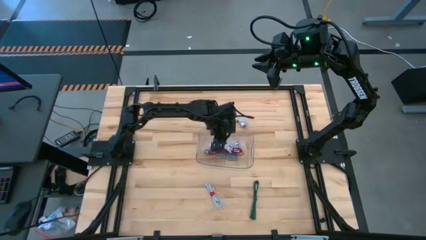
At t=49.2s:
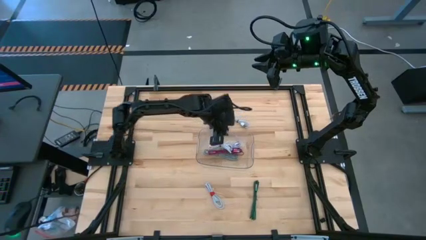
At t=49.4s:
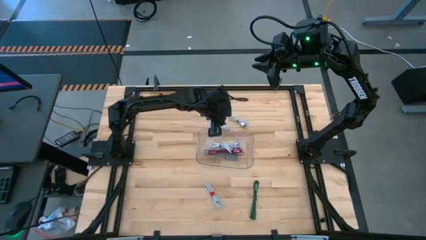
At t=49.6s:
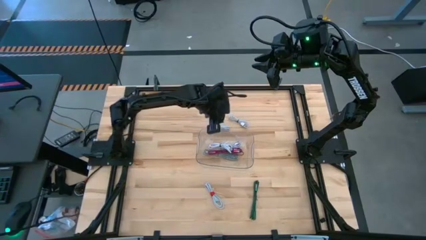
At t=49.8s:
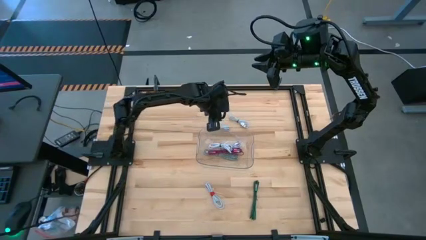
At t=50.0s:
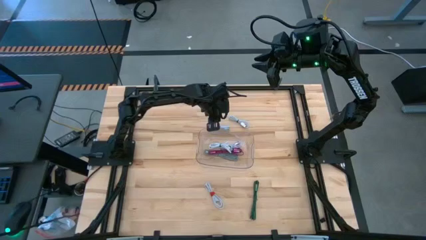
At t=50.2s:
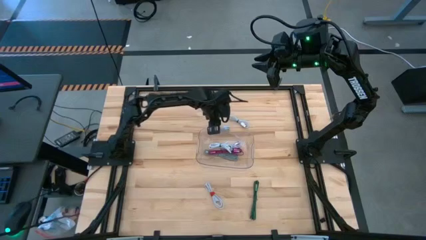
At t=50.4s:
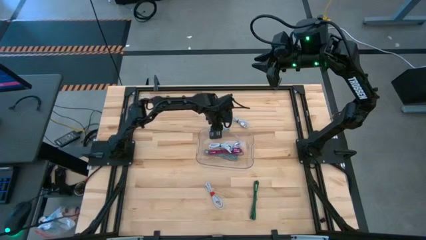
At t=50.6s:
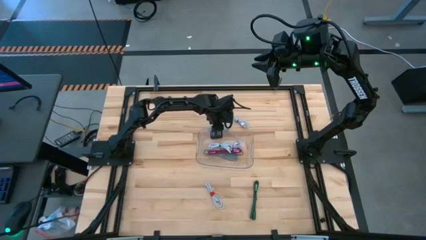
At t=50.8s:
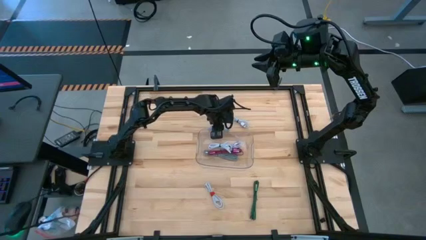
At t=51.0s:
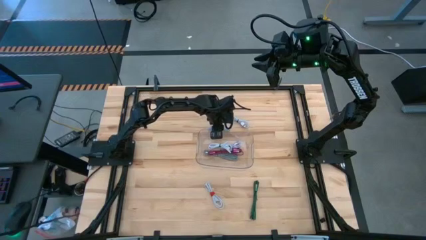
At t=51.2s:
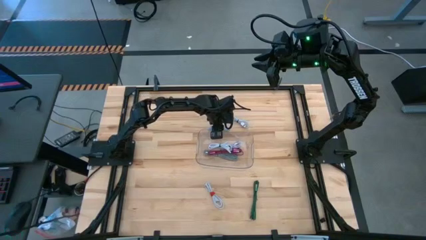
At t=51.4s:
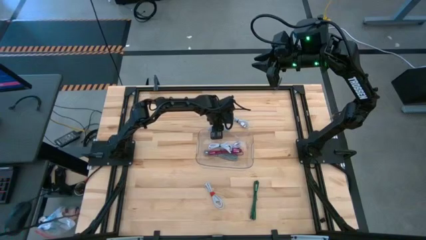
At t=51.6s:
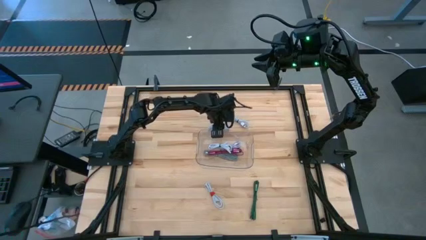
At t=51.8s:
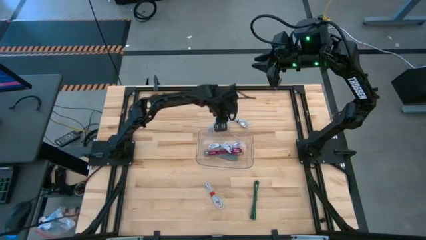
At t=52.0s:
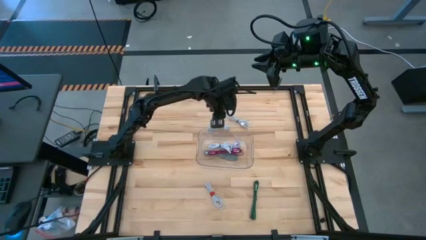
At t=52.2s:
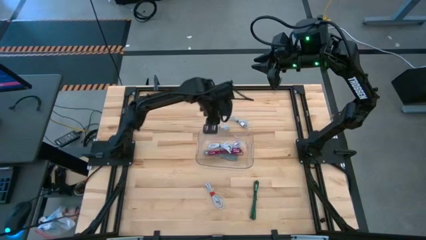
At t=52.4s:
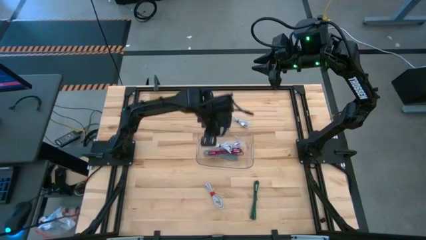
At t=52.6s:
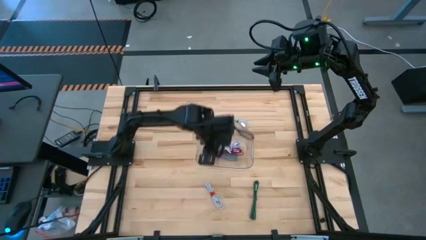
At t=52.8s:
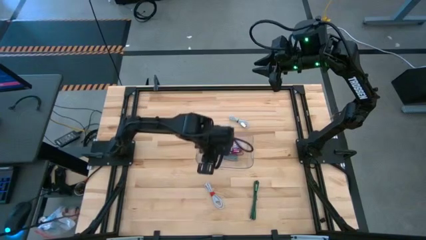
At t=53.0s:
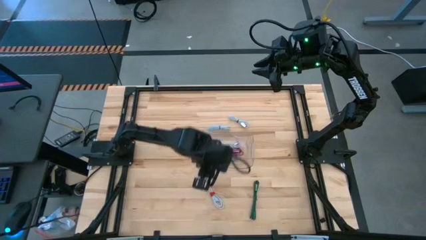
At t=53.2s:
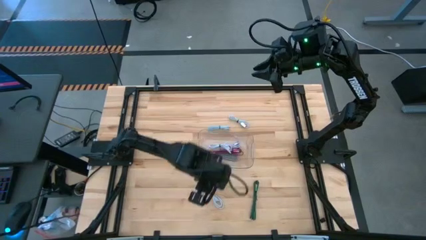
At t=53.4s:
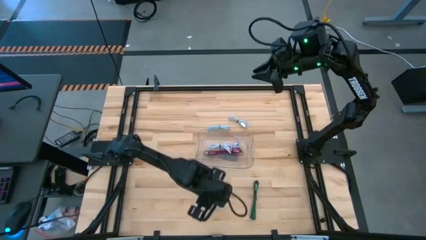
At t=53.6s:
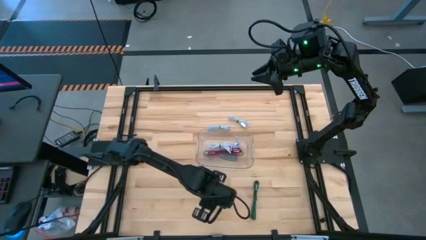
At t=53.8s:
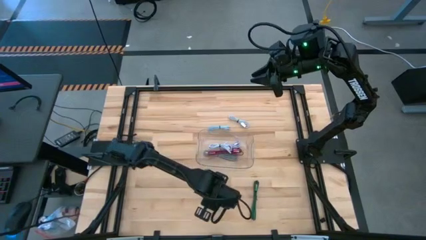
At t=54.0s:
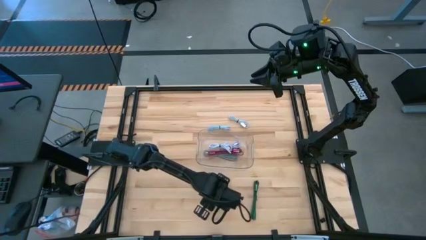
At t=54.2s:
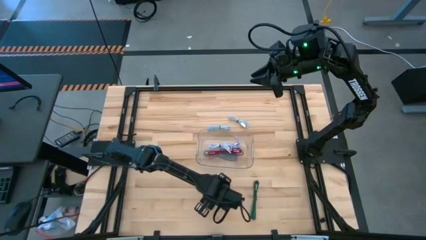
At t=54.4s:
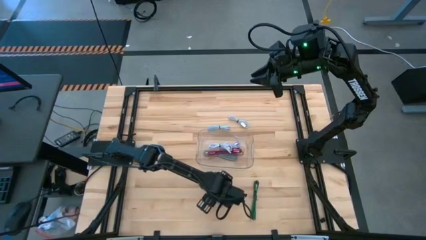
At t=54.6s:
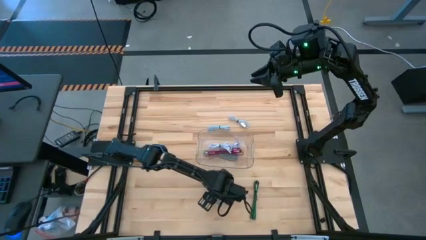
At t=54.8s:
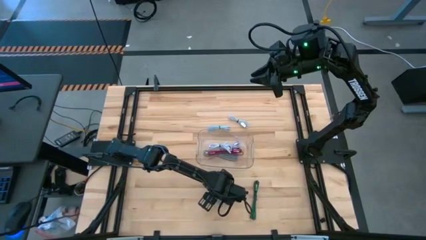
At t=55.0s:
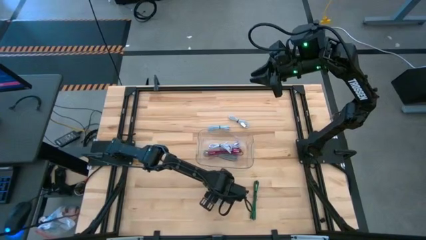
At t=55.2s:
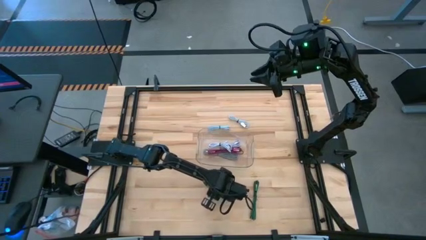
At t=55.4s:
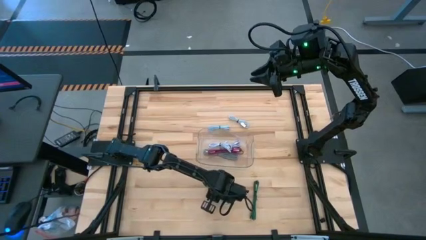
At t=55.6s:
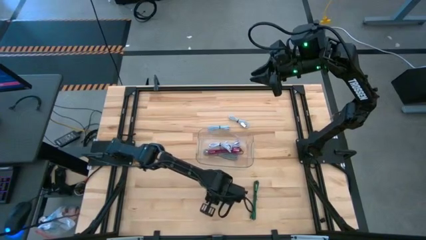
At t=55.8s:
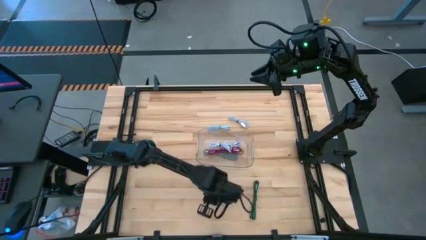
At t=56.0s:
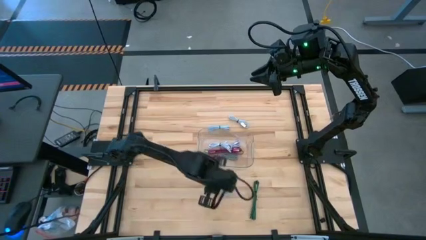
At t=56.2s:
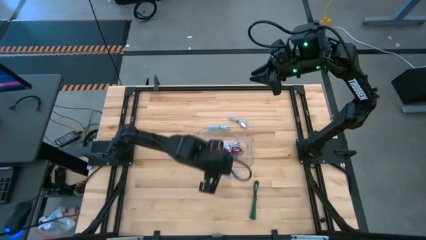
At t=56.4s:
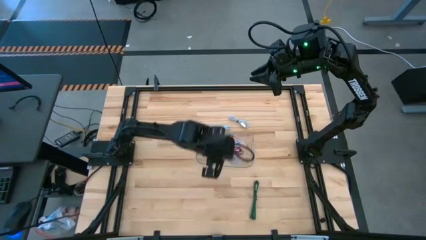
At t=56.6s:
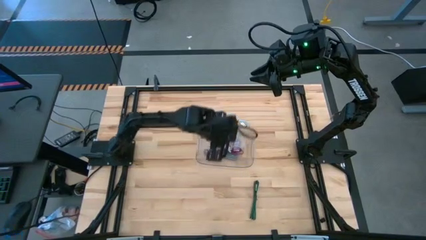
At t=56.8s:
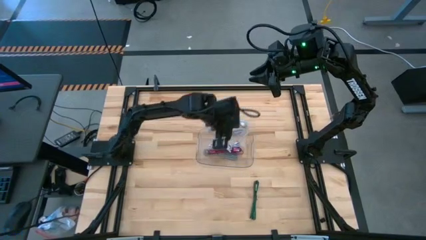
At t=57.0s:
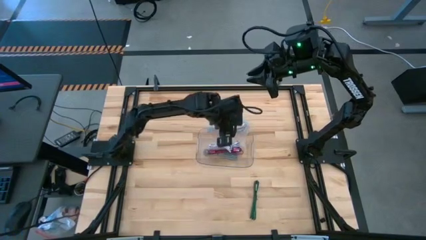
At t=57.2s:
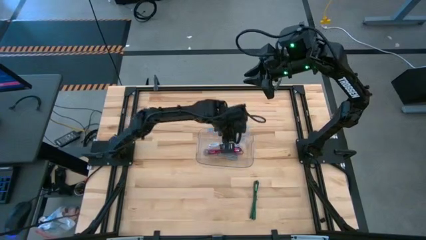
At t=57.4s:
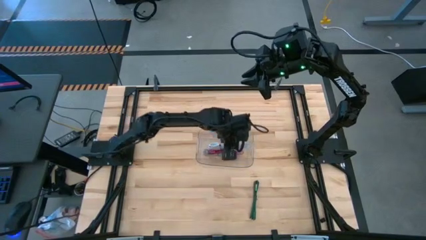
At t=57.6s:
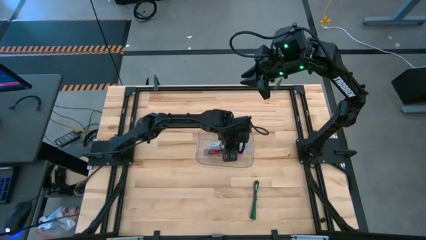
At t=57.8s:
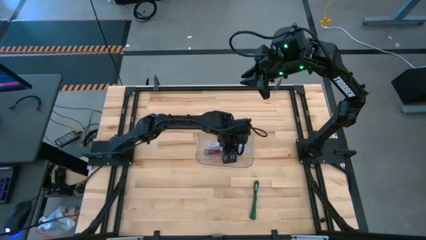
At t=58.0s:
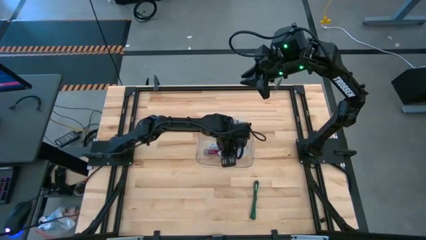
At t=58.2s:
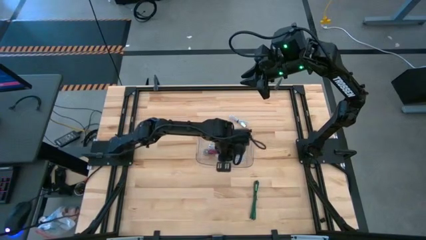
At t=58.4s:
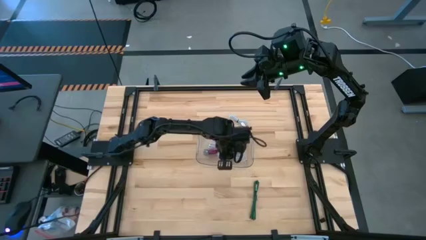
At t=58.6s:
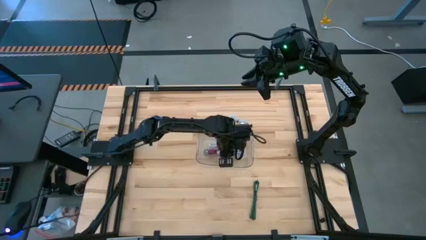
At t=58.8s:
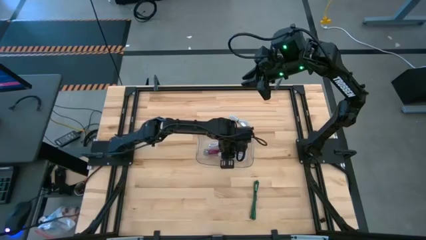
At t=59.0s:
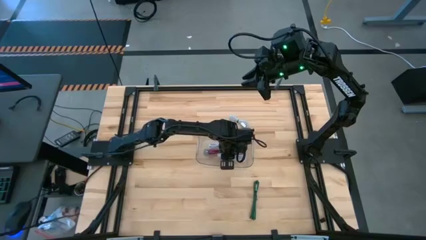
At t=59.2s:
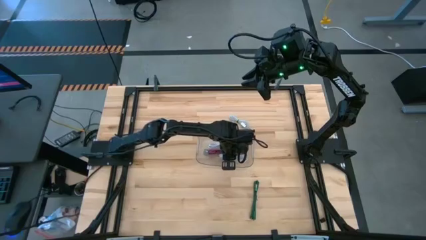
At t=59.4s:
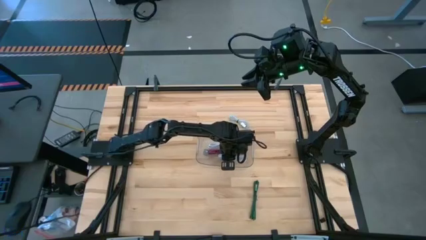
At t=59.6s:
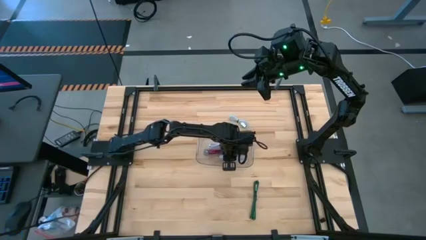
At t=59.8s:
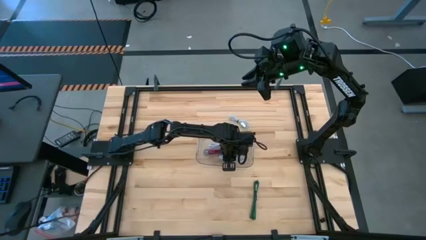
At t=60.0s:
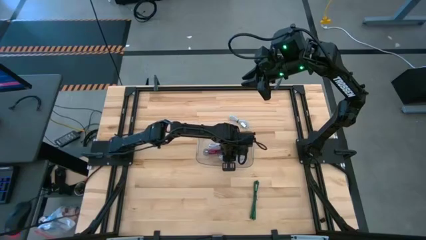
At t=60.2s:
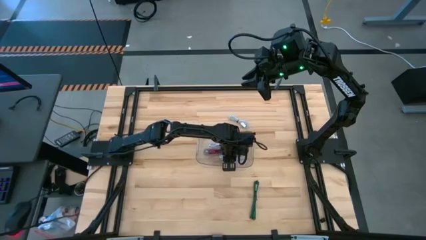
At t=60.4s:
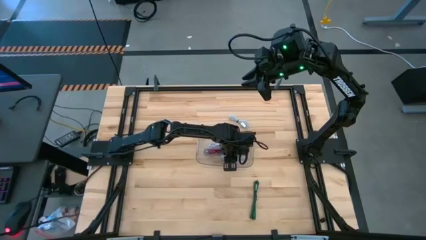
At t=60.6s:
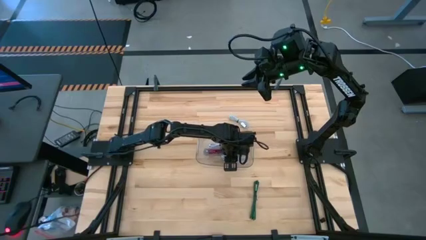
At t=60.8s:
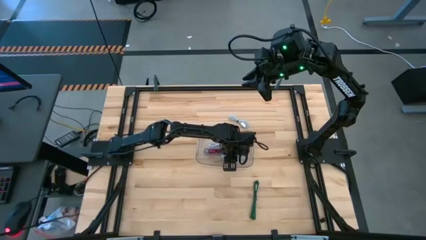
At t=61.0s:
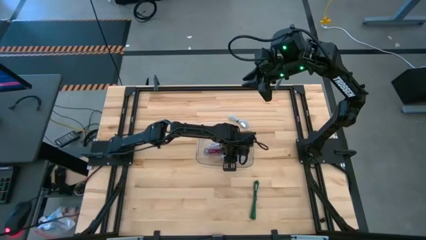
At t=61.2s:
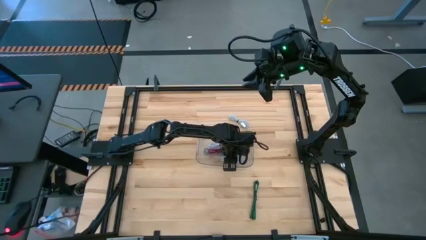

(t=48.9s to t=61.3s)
Task: Pick and place USB-C Cables
Put the white charger cable into the transparent bin
